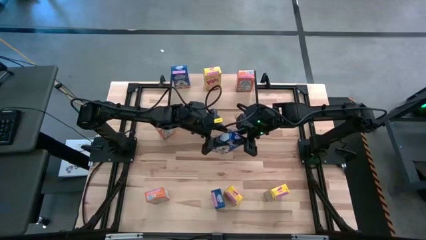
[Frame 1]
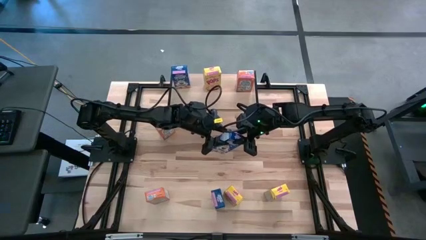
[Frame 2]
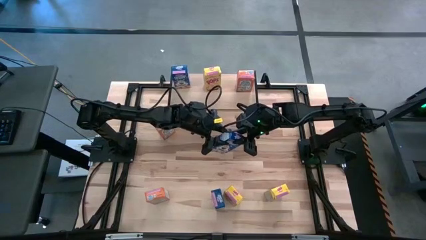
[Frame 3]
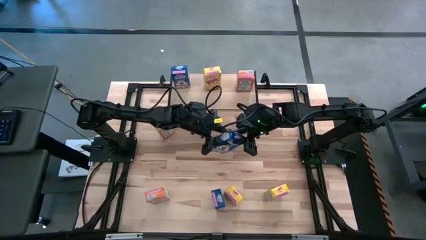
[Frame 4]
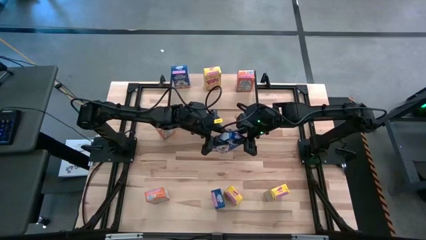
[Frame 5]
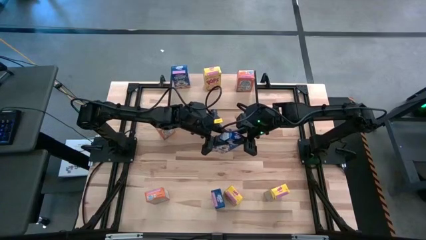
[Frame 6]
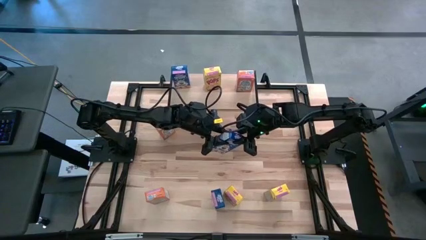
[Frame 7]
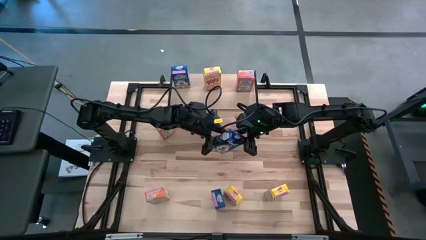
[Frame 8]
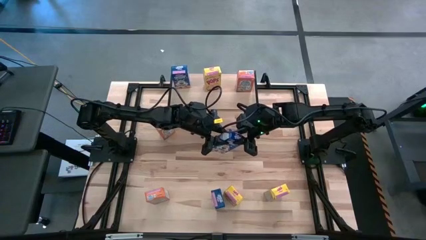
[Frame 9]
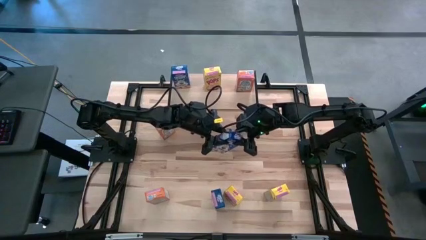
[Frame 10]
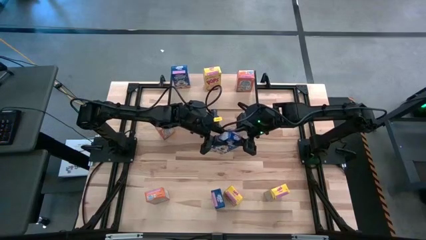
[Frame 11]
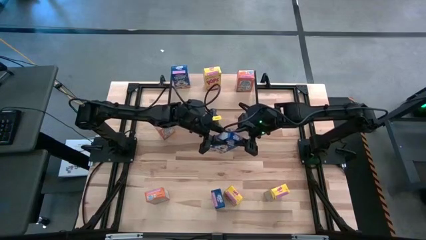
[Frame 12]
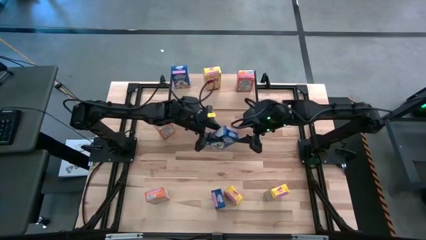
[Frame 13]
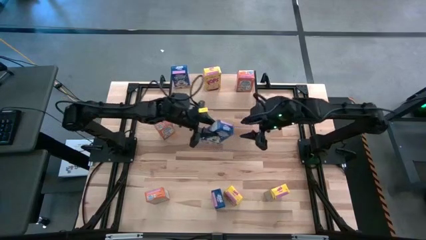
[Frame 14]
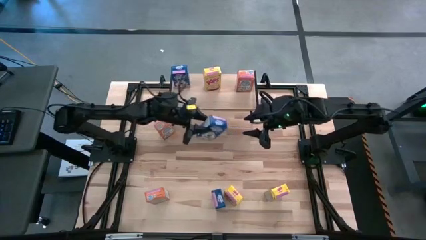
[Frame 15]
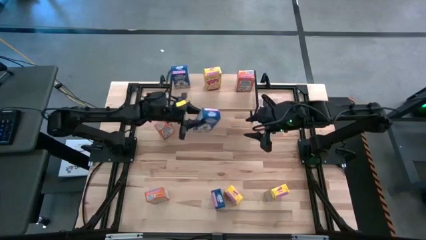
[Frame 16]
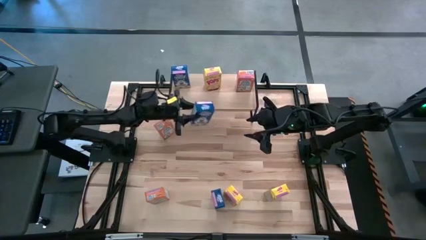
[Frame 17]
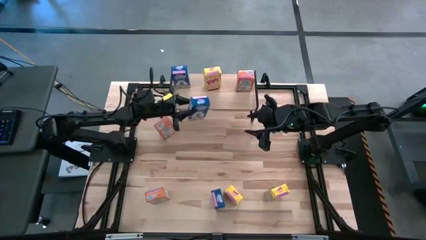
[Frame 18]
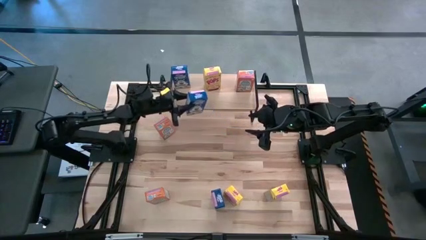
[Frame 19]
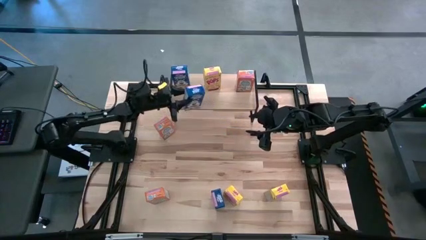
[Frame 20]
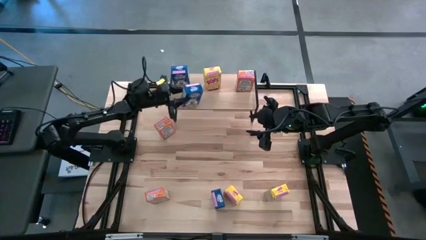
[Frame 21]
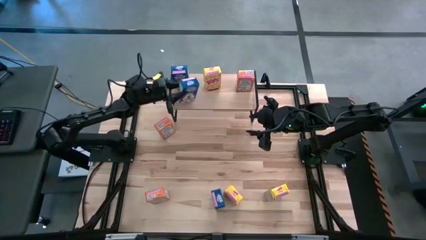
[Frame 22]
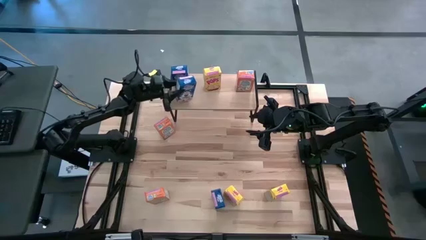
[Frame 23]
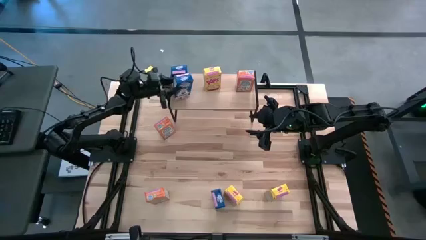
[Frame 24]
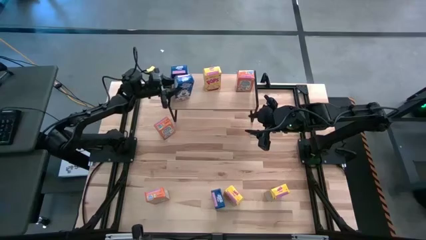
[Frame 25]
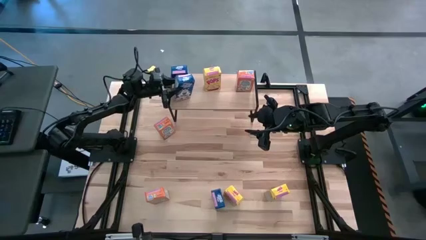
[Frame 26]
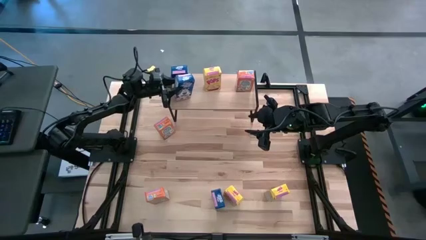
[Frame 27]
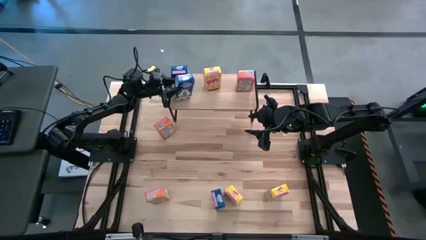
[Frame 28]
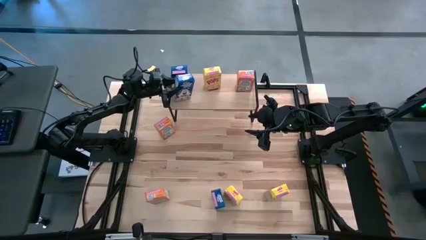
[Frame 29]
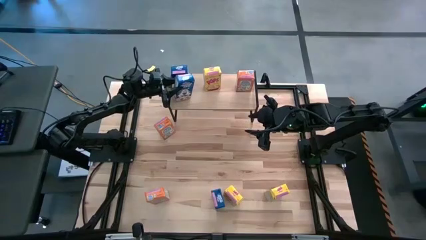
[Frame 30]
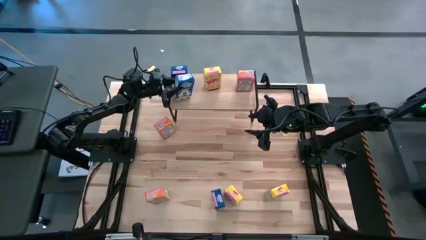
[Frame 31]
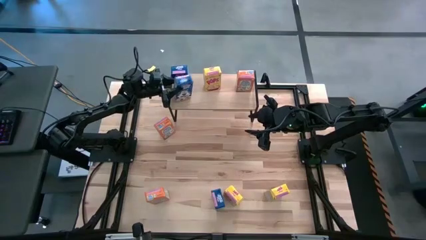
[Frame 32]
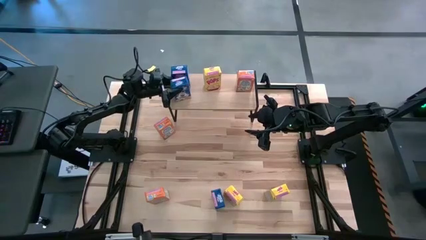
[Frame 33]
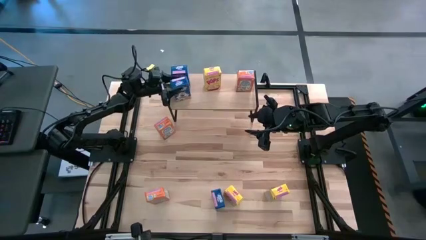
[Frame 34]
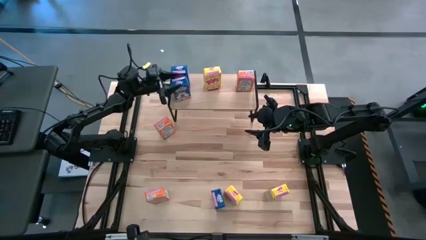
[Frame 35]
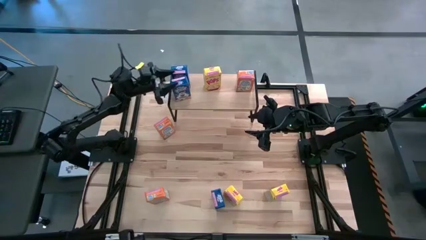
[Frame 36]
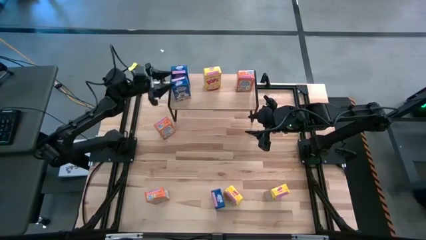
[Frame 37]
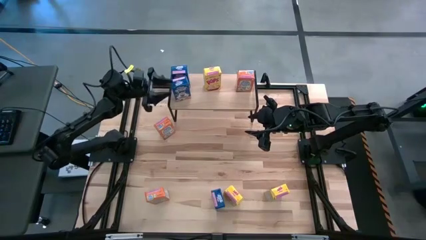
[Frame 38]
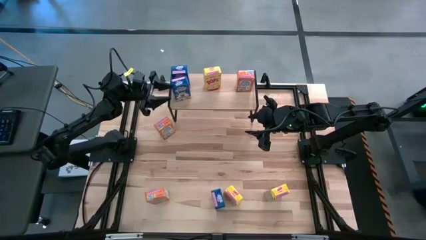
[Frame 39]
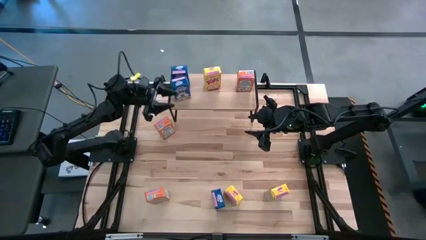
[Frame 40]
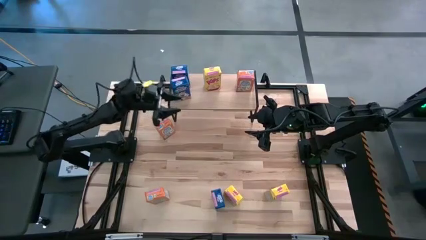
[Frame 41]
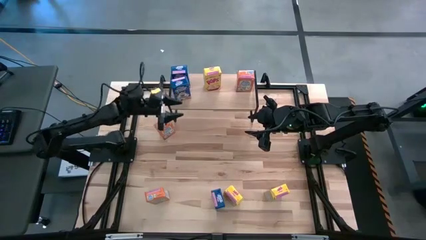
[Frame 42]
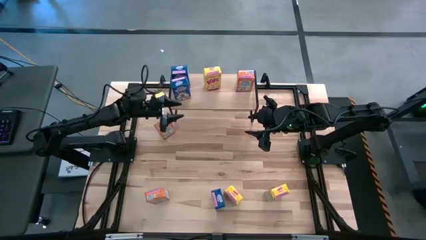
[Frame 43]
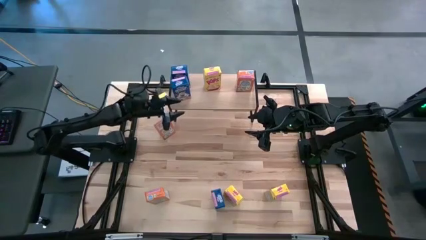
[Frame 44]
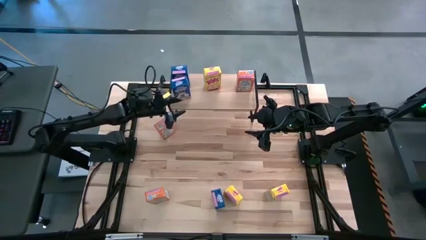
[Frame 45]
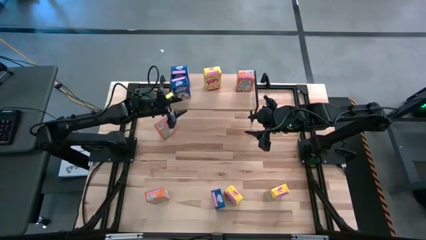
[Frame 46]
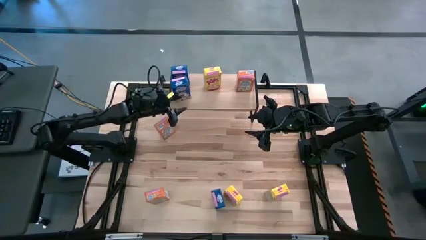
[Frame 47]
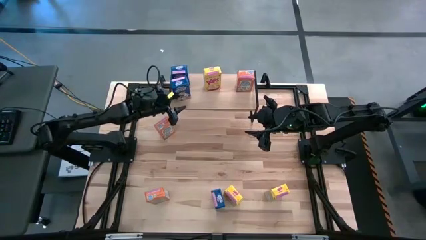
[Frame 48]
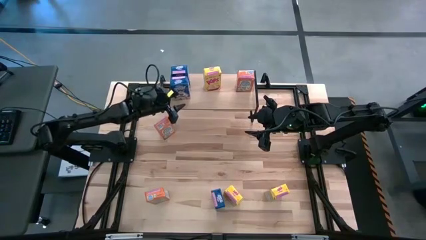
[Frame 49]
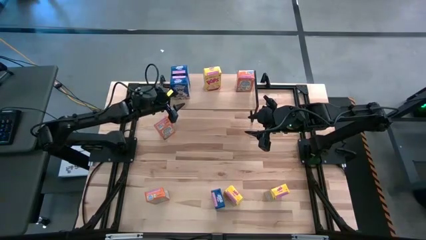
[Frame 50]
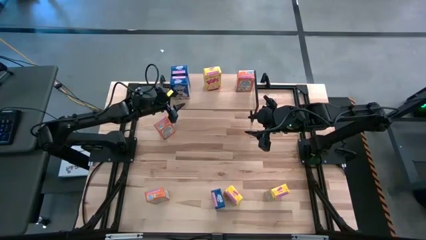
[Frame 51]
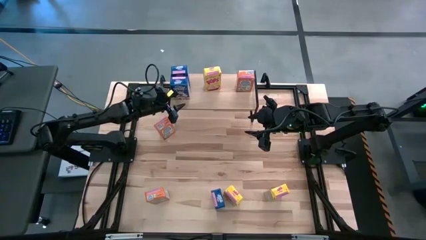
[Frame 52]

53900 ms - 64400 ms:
Task: Stack cereal on shelf
Put the top blue cereal box on the shelf
